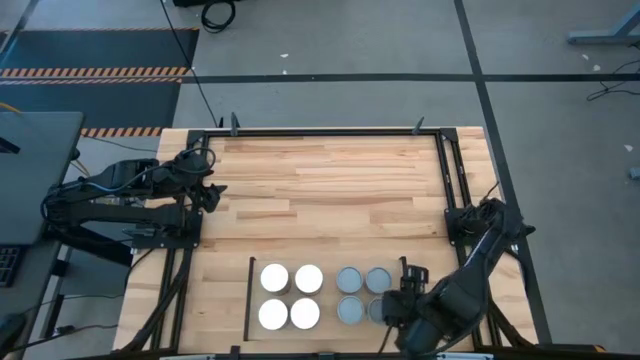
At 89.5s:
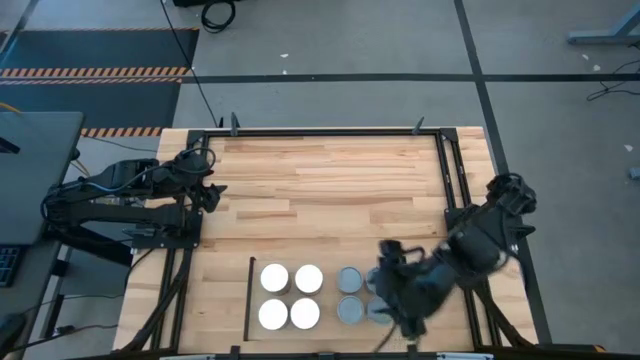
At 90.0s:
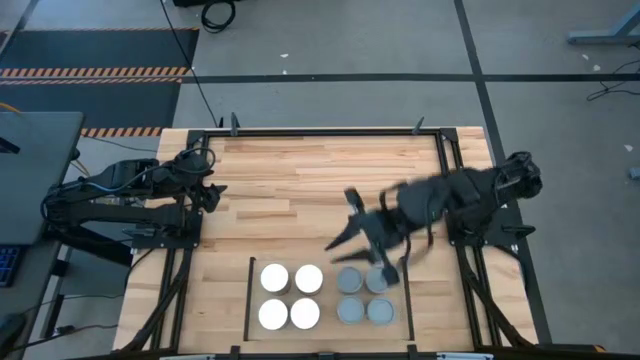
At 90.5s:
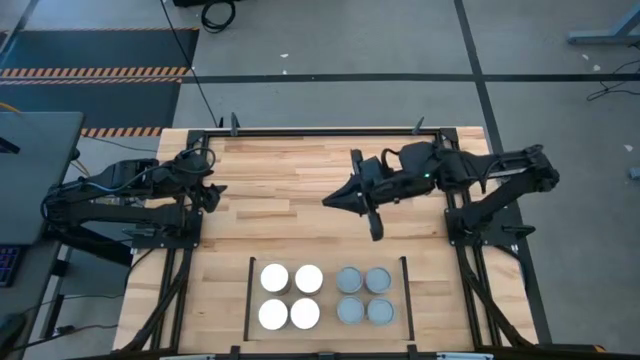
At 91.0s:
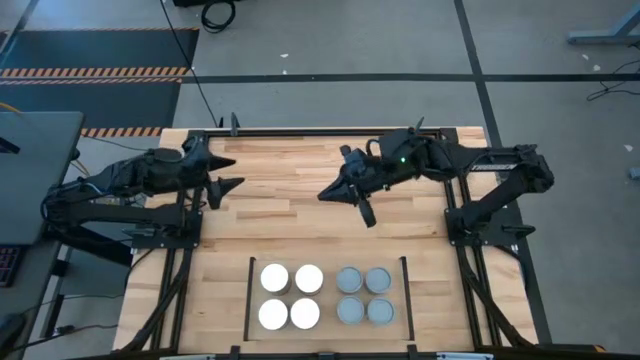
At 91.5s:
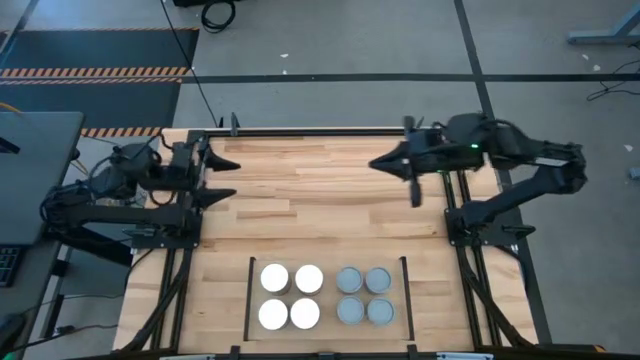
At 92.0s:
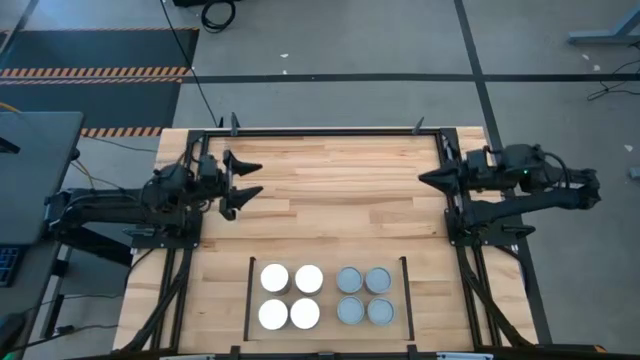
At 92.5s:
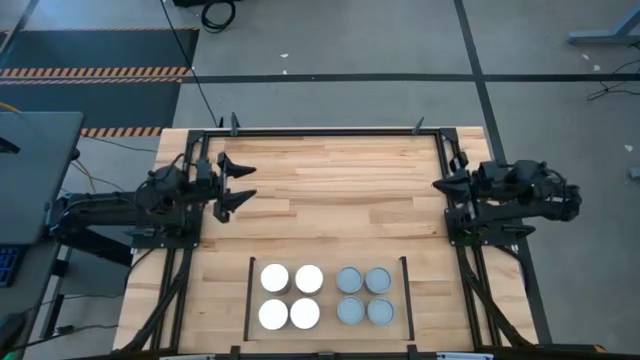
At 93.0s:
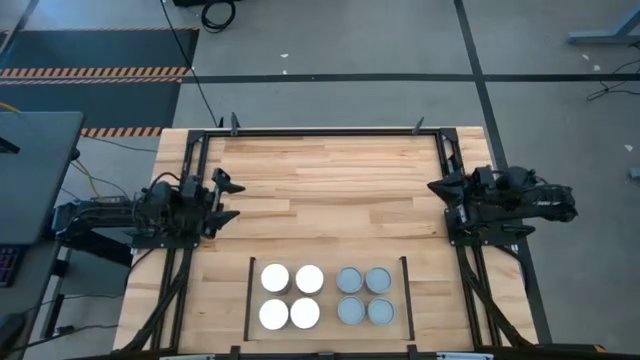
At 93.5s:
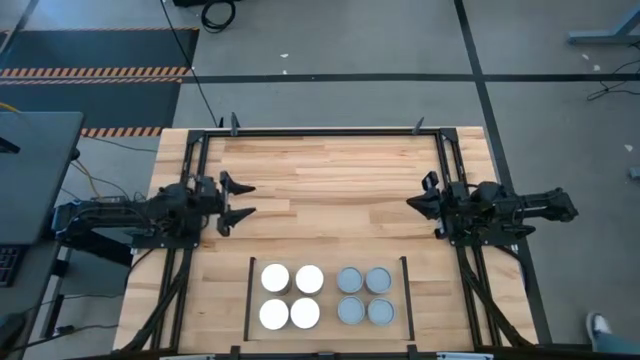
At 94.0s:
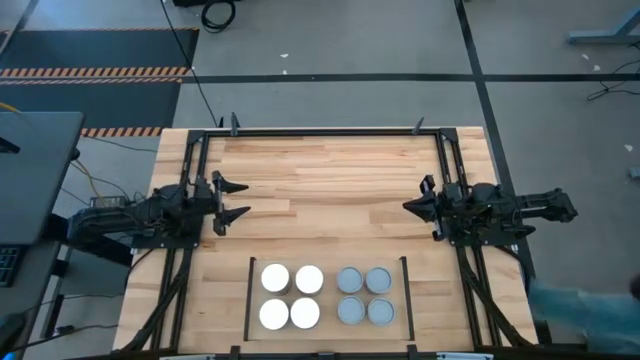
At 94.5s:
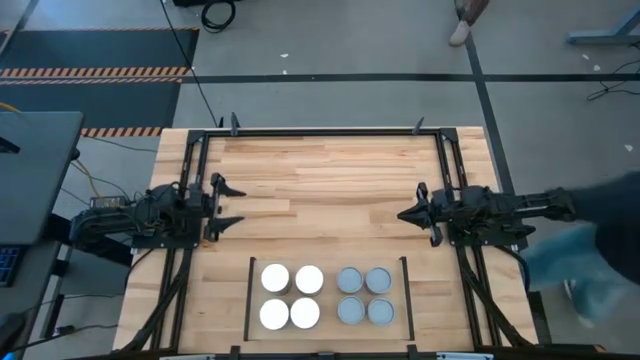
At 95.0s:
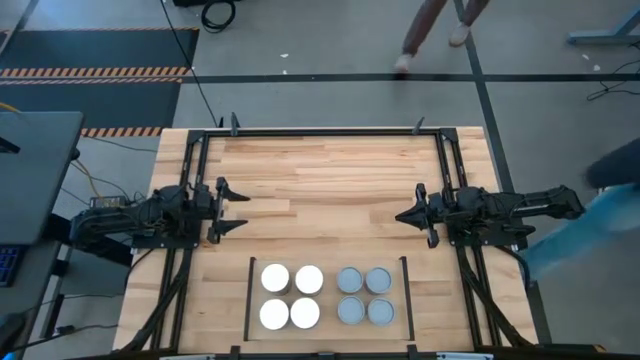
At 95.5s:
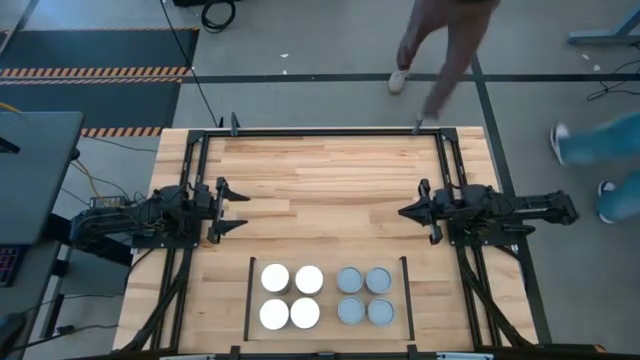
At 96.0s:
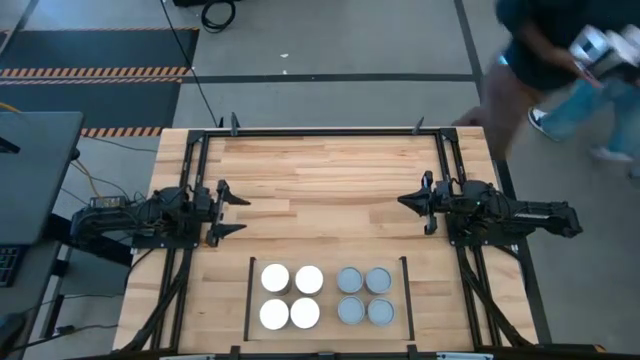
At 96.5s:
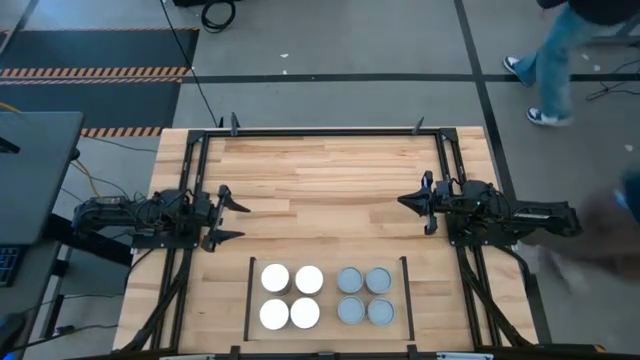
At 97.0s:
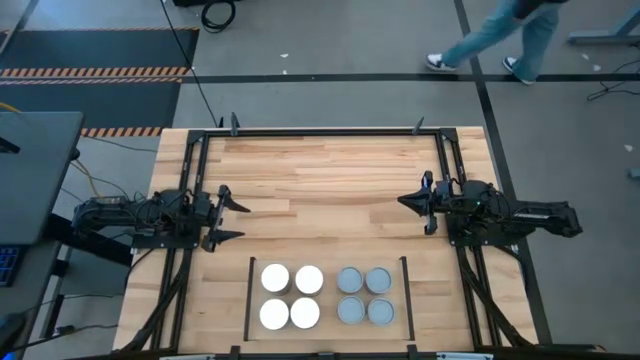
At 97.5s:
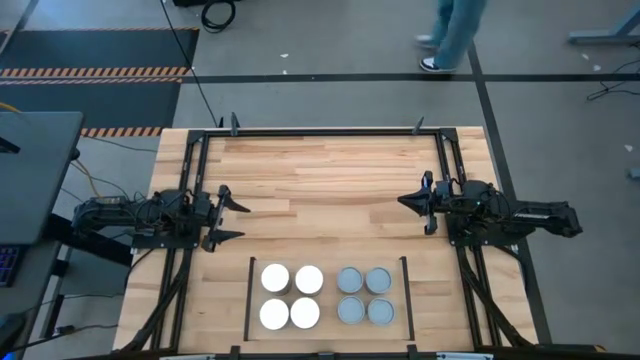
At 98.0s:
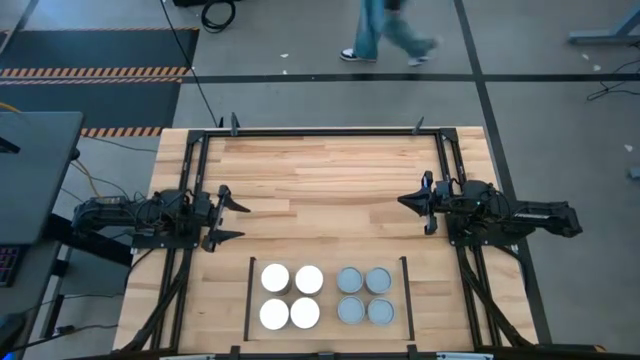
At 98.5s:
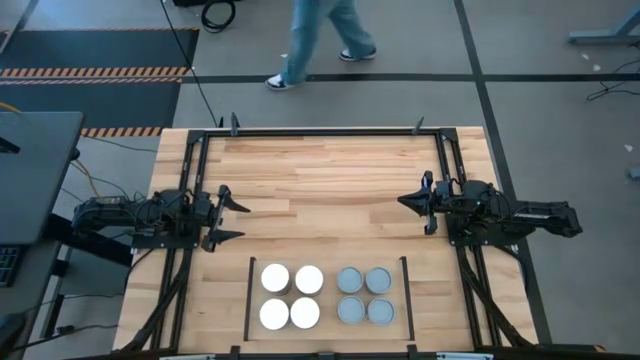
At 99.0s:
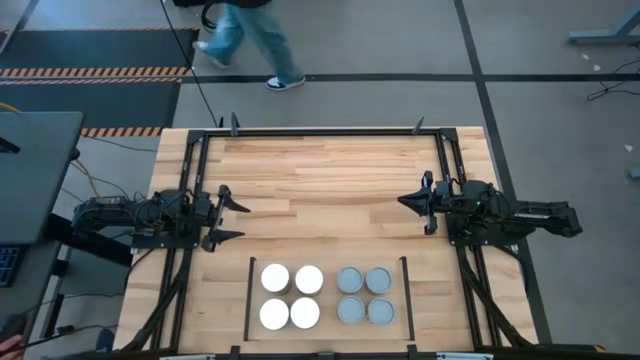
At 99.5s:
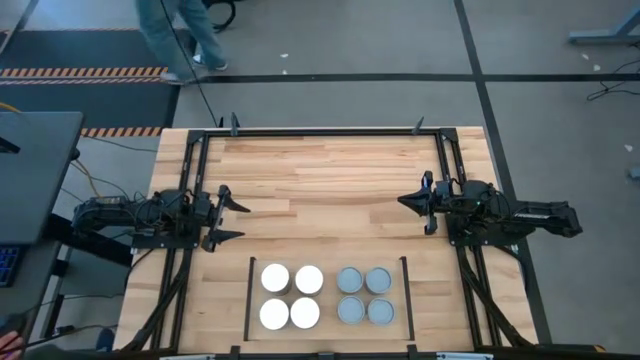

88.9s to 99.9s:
Task: Pick and place cans onto a shelf
Return to Home Position

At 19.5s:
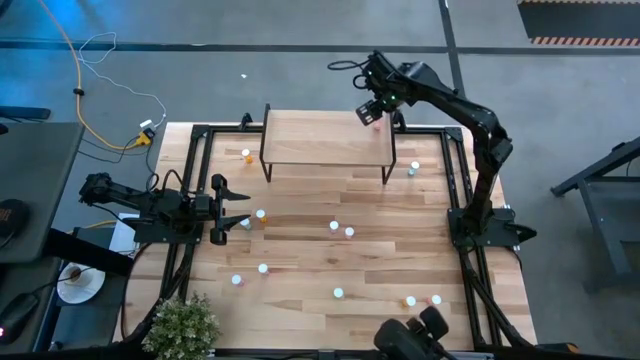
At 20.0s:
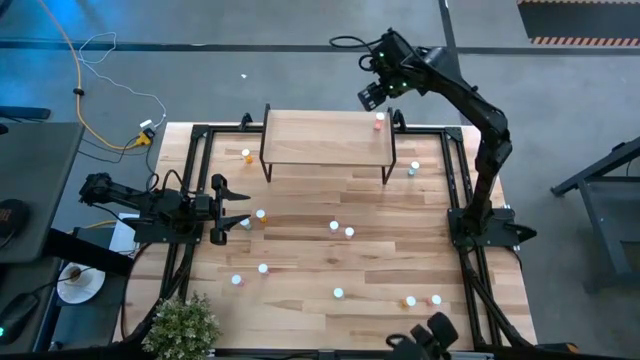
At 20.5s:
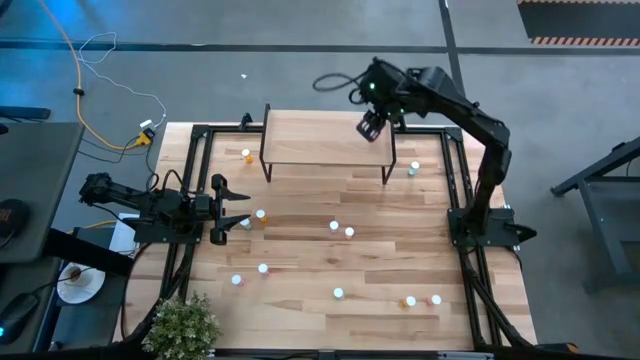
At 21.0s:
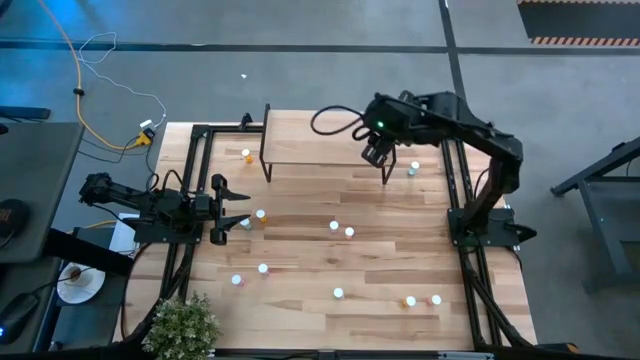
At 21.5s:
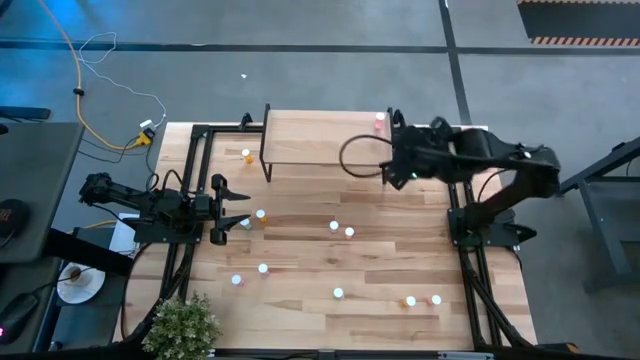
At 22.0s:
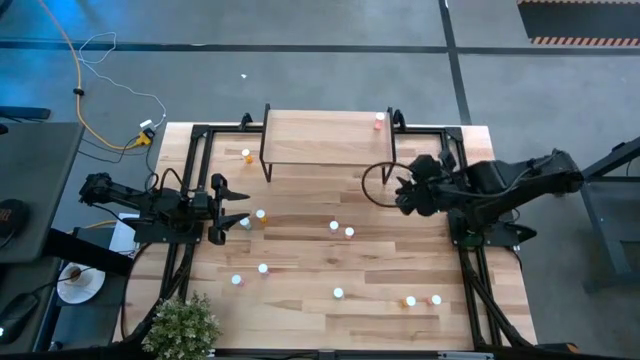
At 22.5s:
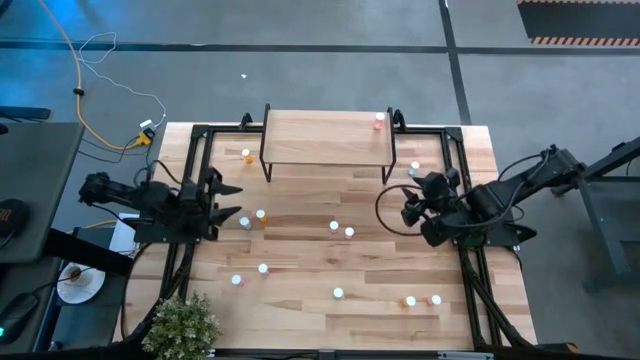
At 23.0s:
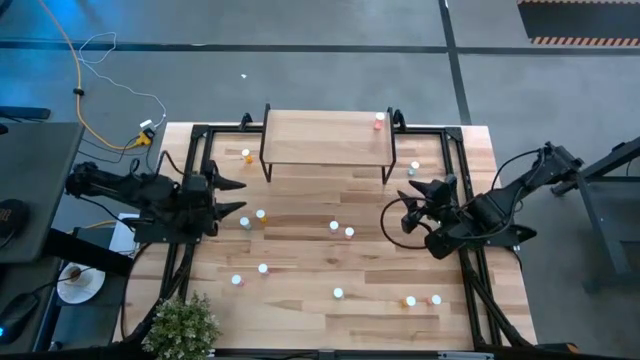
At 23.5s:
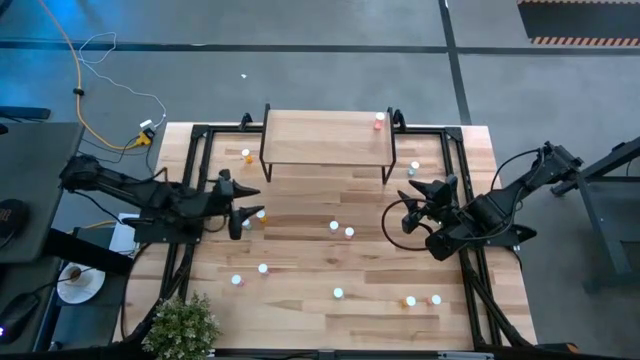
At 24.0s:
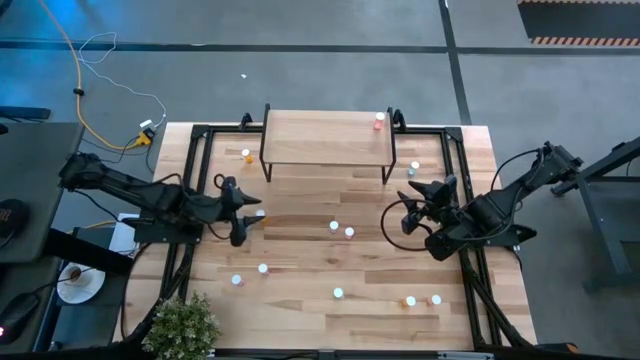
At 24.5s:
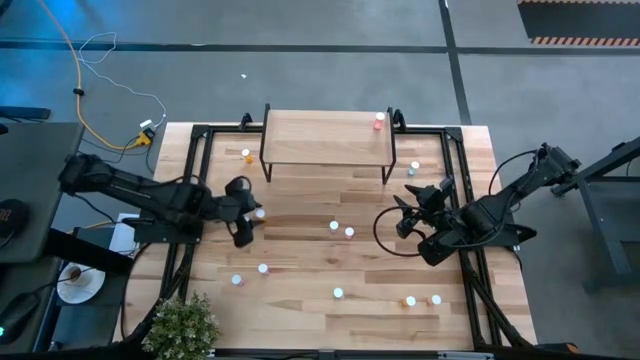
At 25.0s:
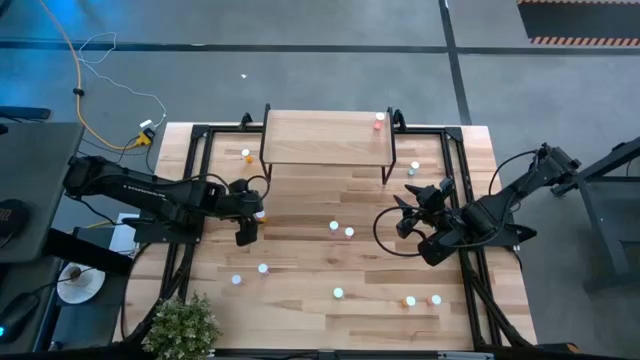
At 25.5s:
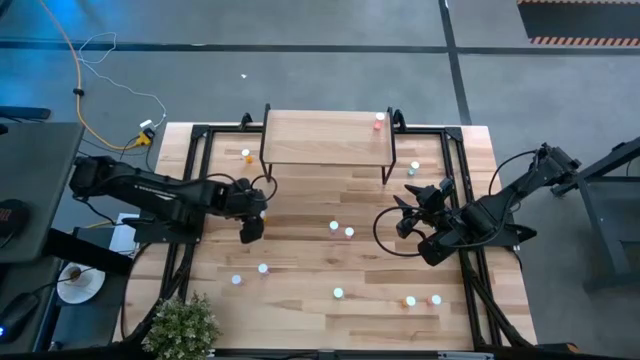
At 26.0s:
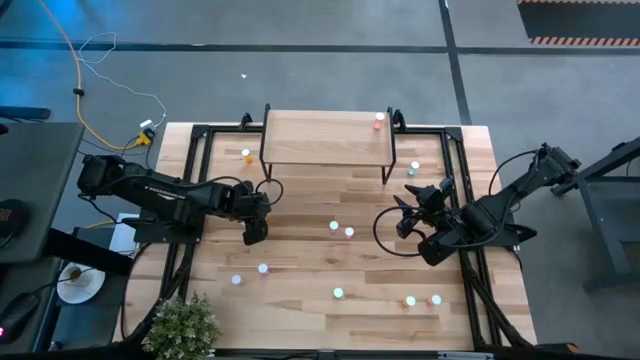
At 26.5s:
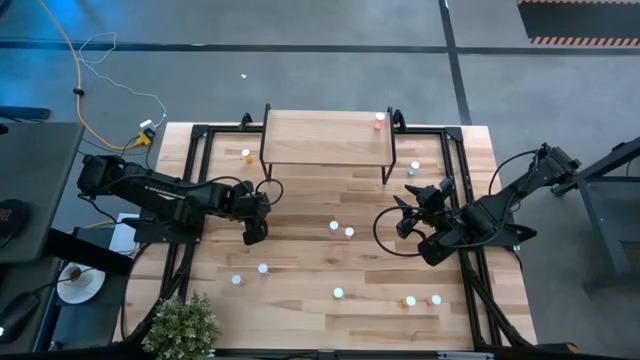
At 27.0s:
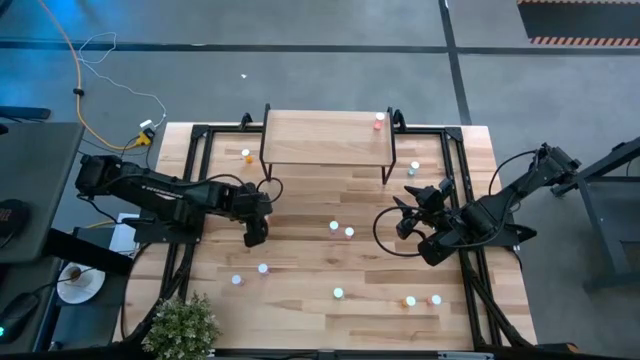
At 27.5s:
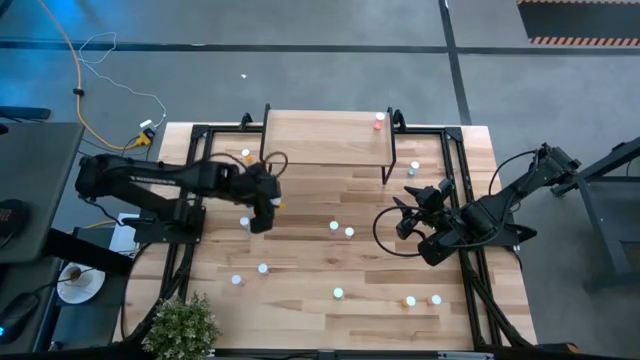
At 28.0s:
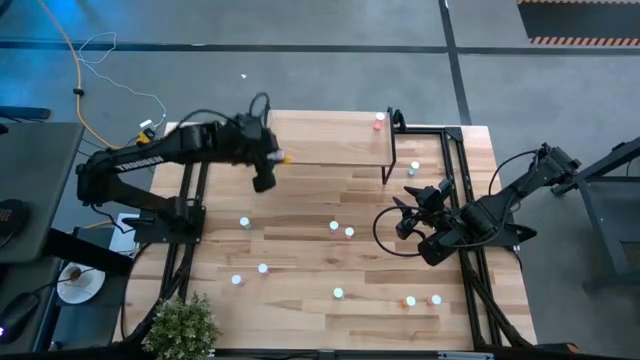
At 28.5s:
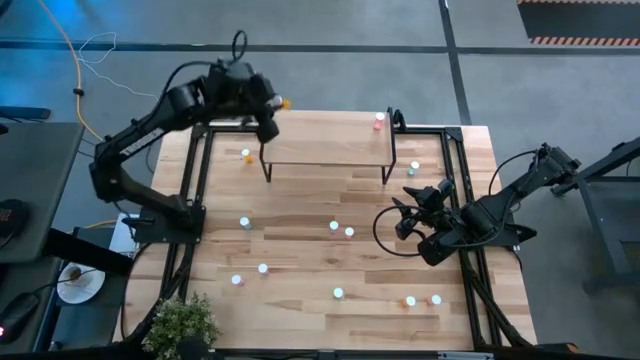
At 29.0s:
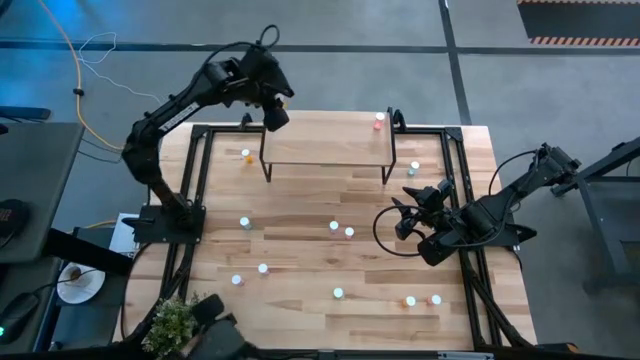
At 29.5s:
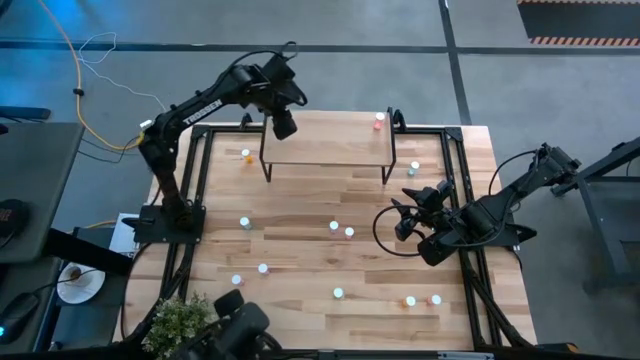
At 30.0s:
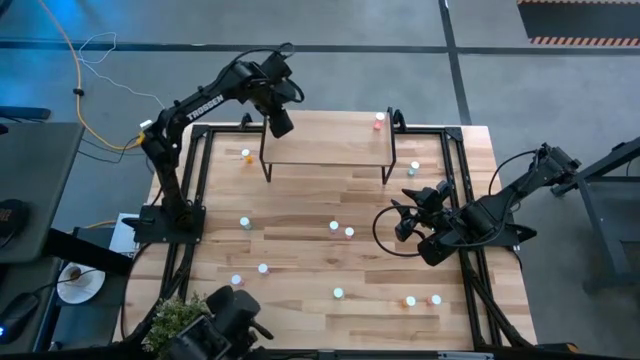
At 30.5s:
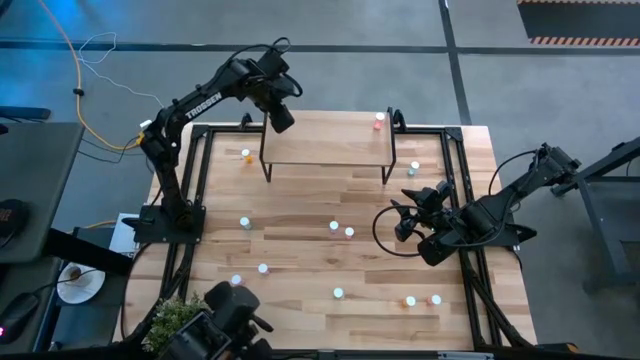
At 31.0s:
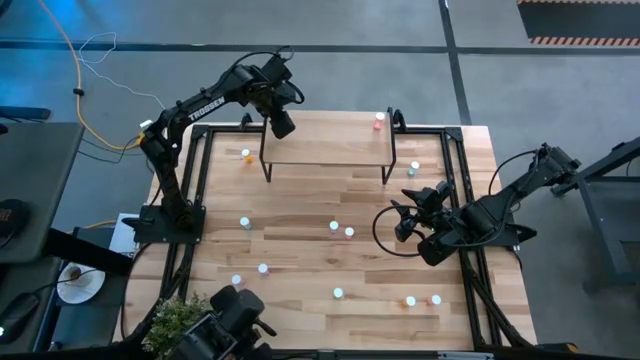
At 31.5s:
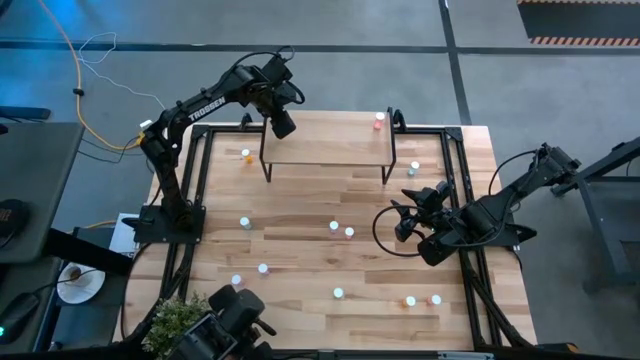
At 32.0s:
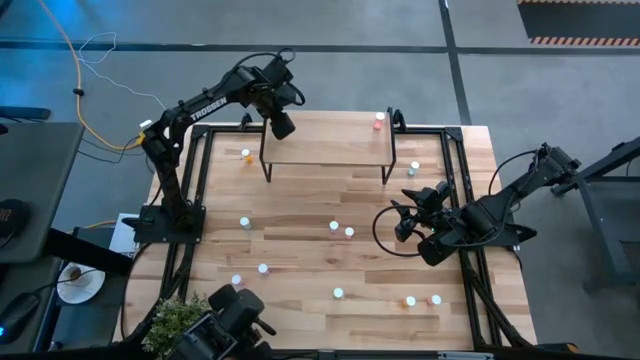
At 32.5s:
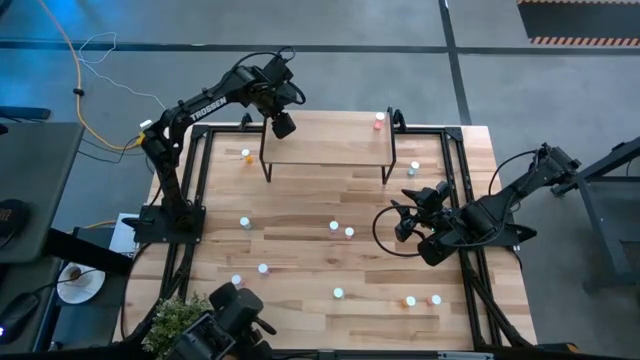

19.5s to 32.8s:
Task: Pick and place medicine bottles onto shelf by color
Put the middle orange pill bottle on the shelf
